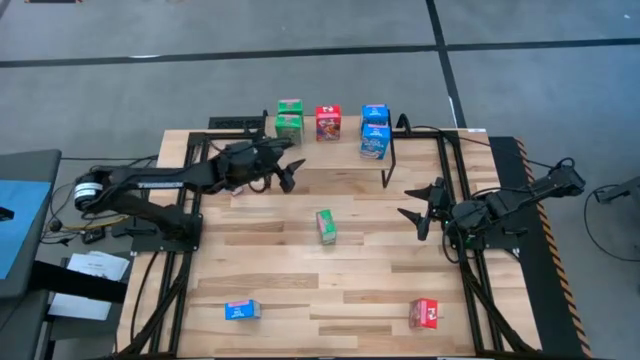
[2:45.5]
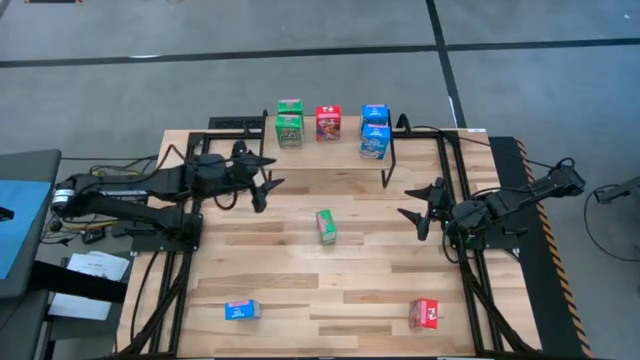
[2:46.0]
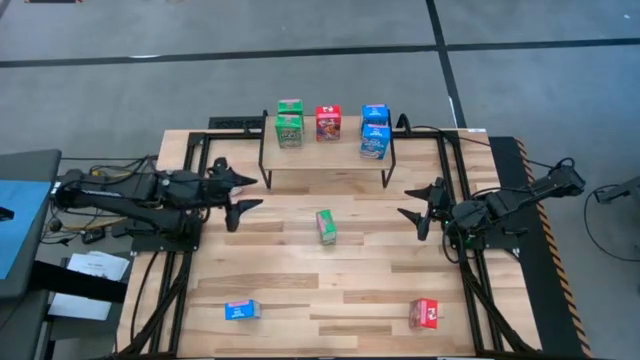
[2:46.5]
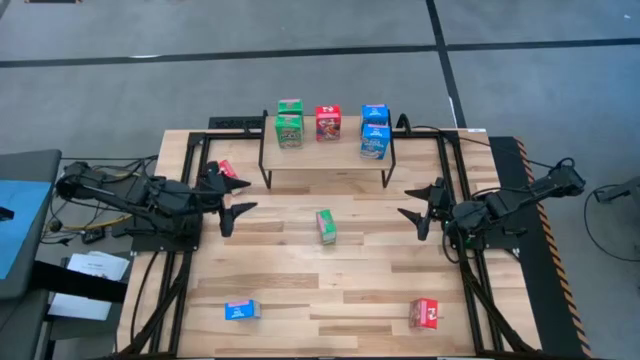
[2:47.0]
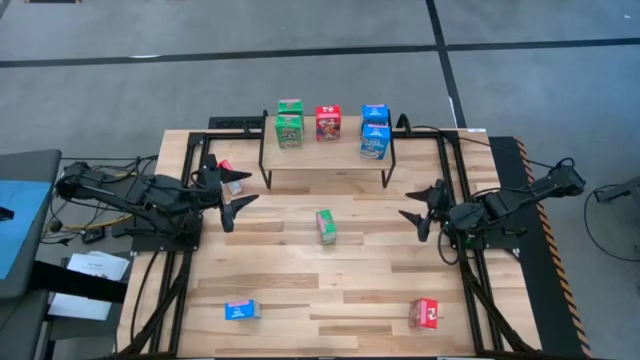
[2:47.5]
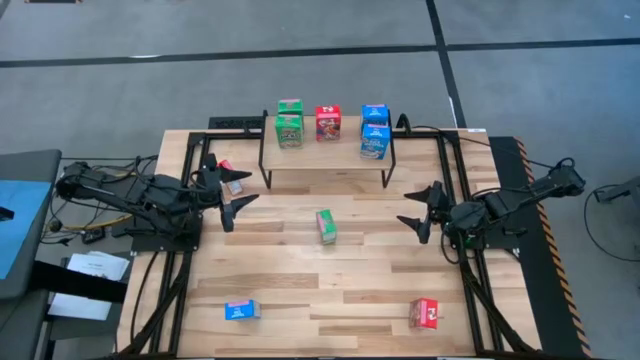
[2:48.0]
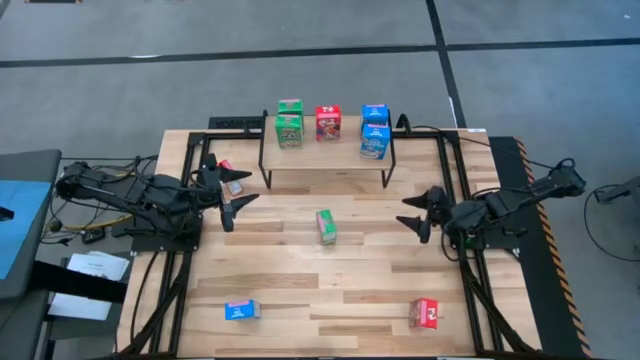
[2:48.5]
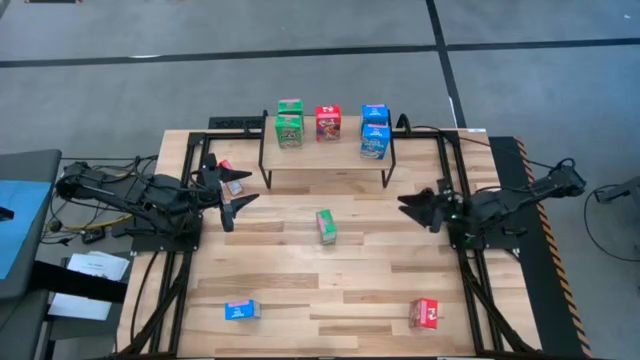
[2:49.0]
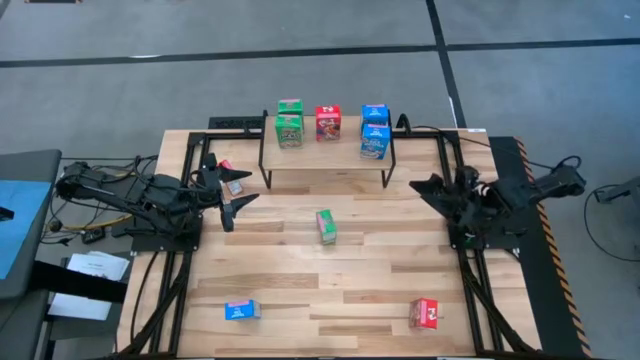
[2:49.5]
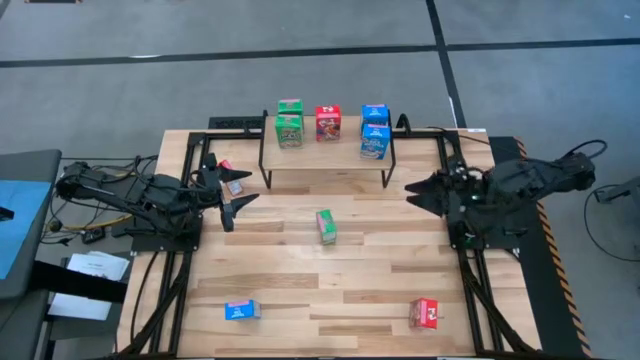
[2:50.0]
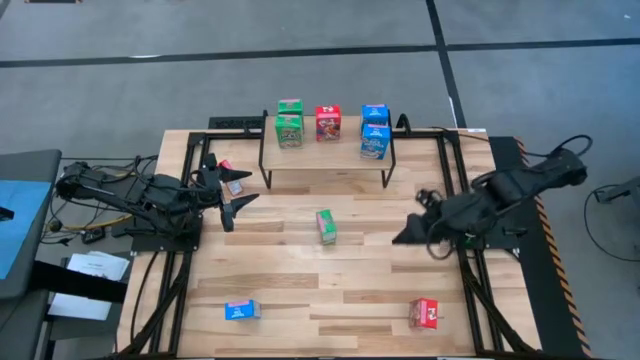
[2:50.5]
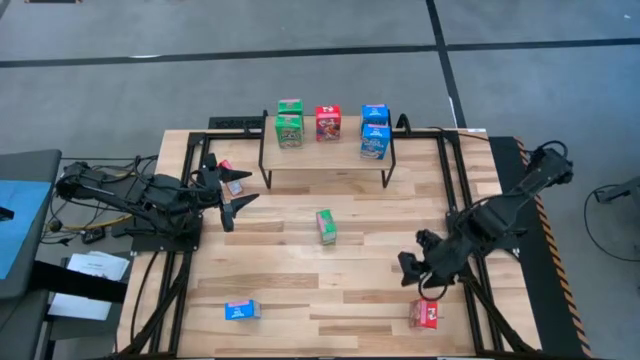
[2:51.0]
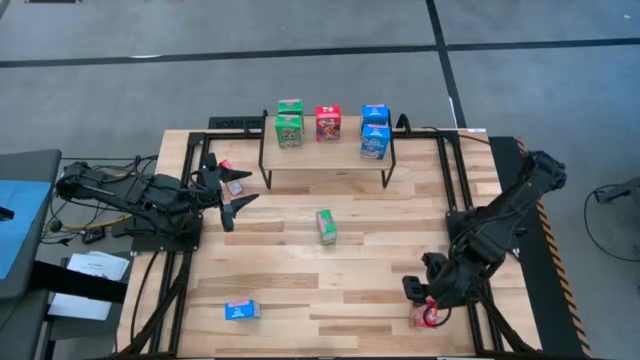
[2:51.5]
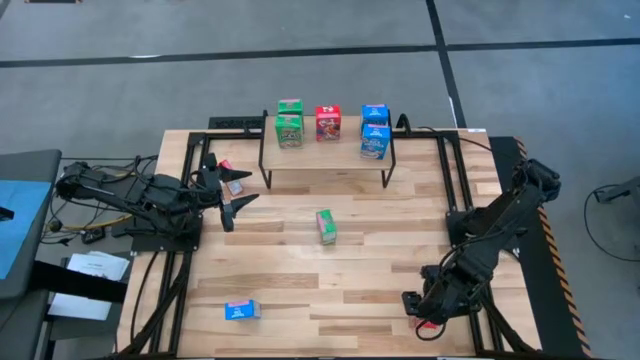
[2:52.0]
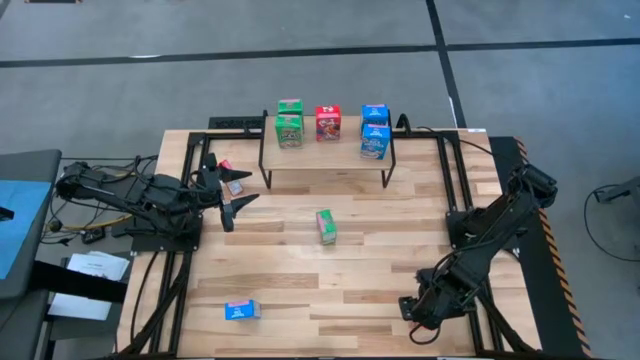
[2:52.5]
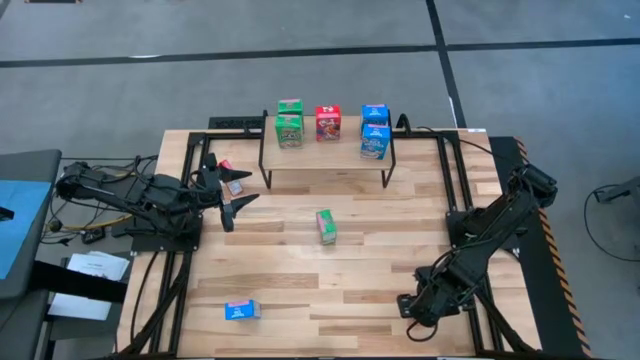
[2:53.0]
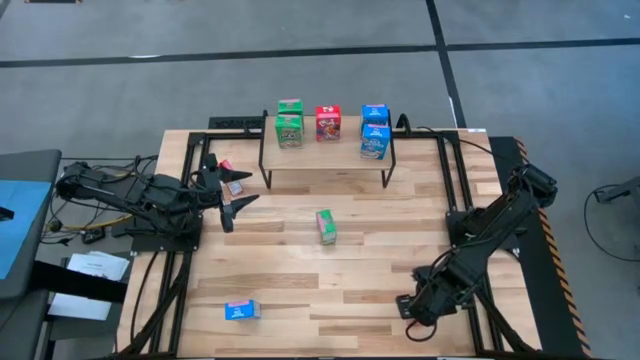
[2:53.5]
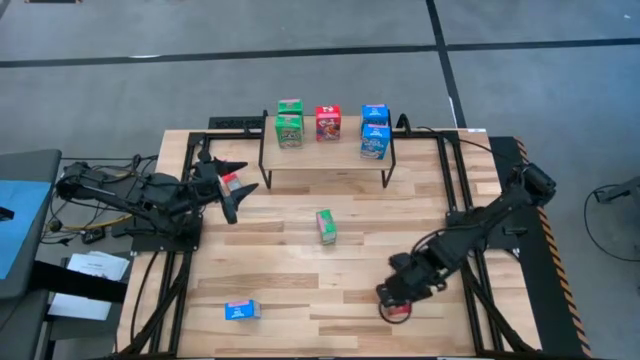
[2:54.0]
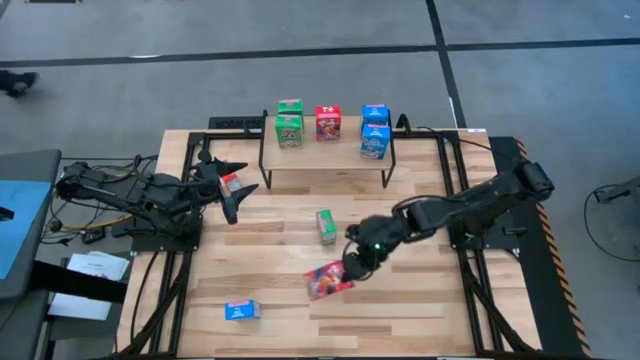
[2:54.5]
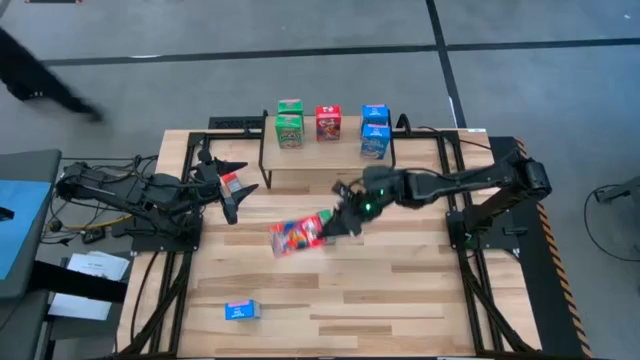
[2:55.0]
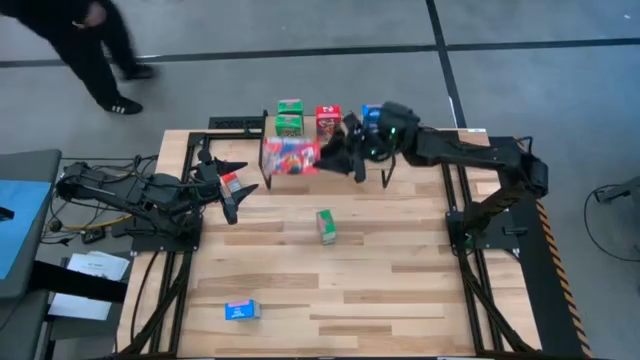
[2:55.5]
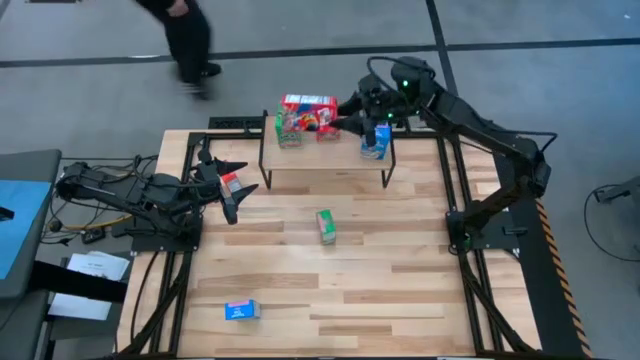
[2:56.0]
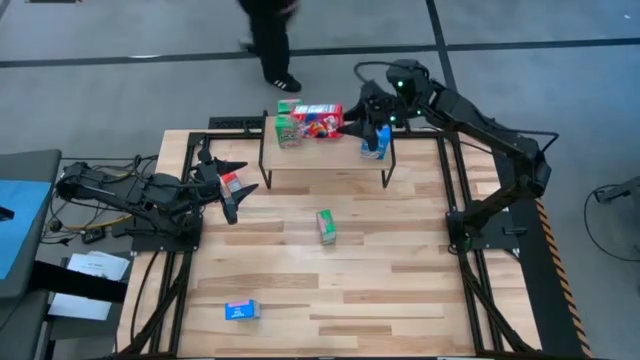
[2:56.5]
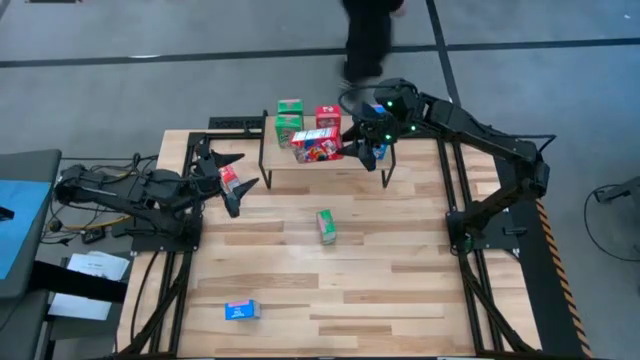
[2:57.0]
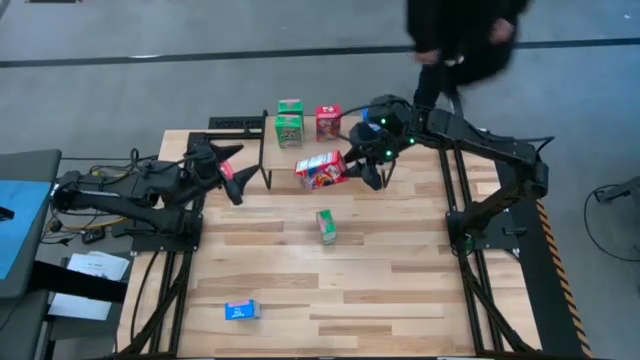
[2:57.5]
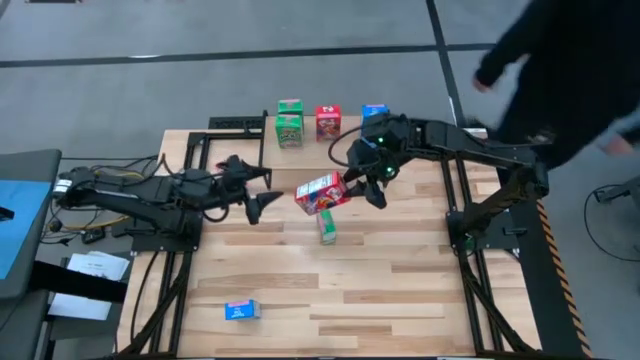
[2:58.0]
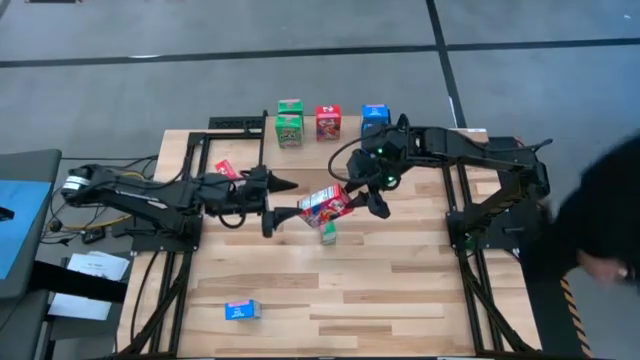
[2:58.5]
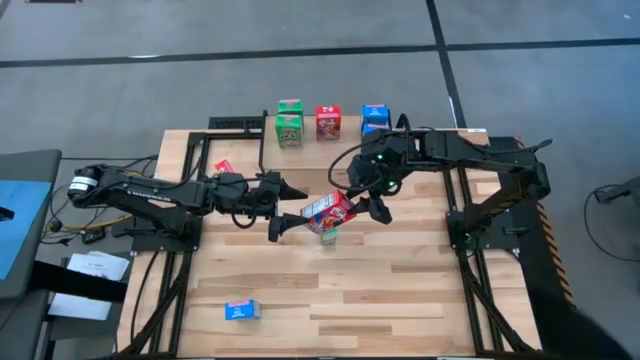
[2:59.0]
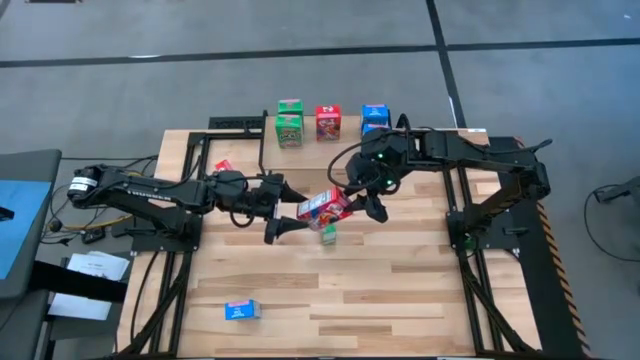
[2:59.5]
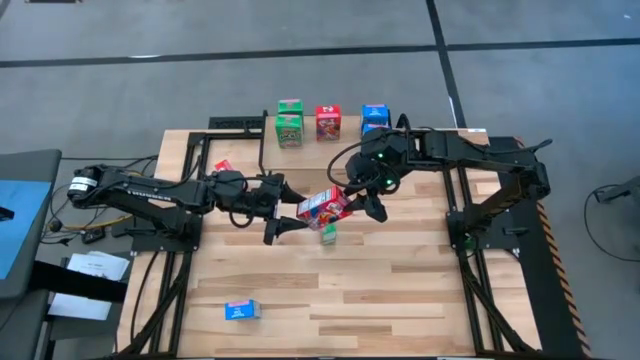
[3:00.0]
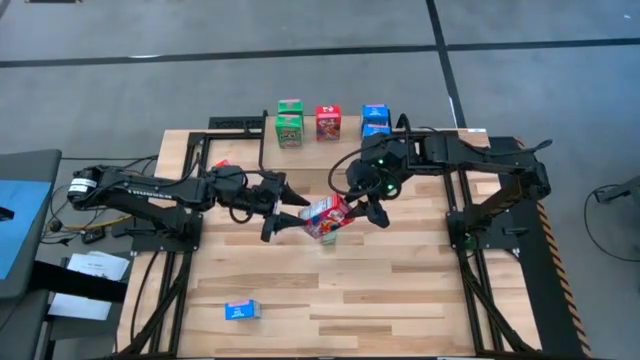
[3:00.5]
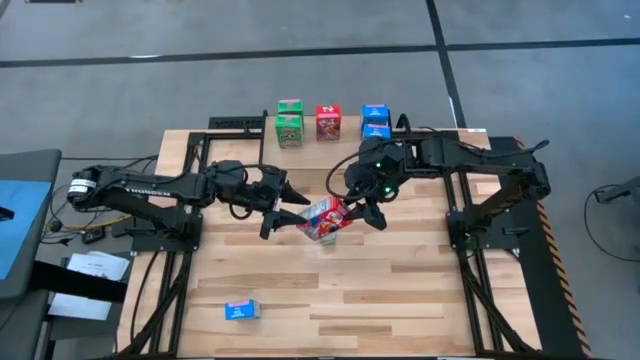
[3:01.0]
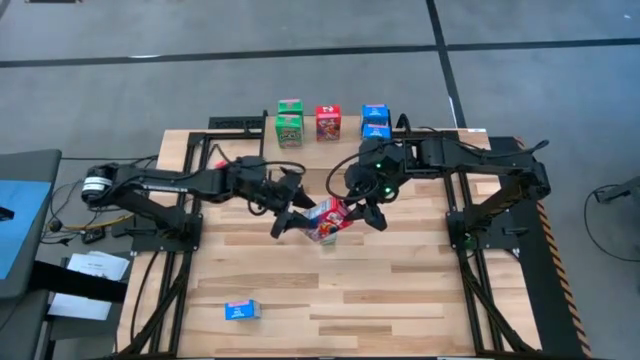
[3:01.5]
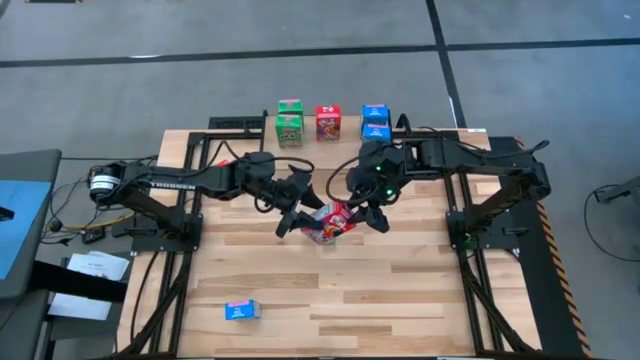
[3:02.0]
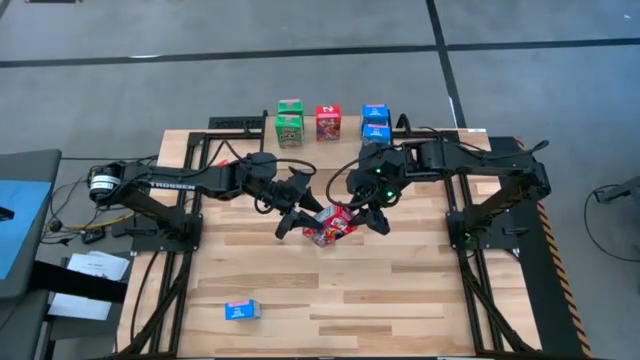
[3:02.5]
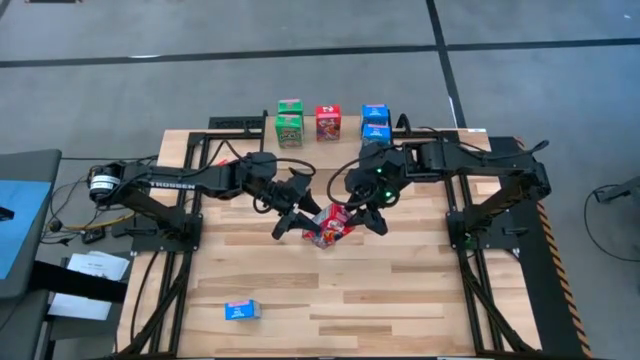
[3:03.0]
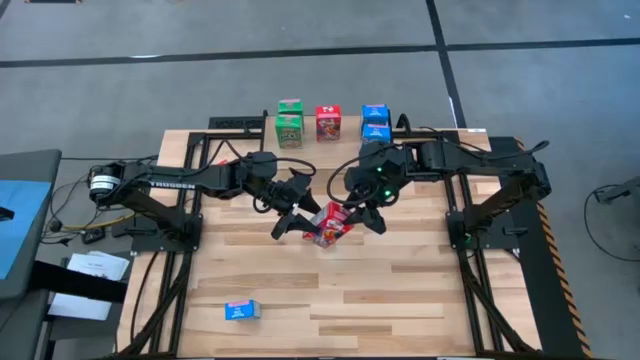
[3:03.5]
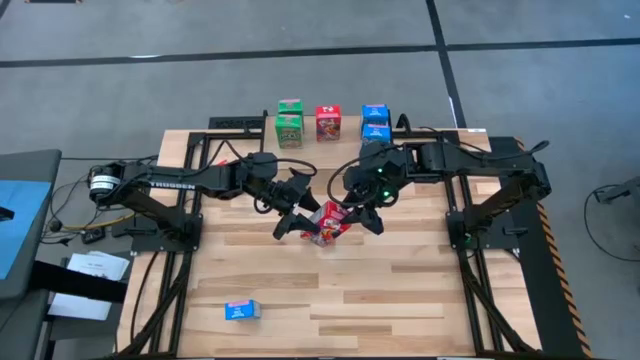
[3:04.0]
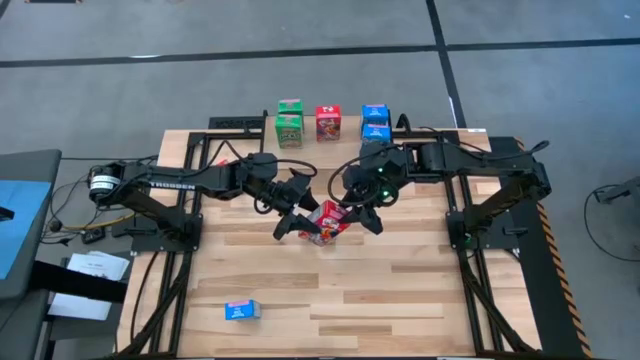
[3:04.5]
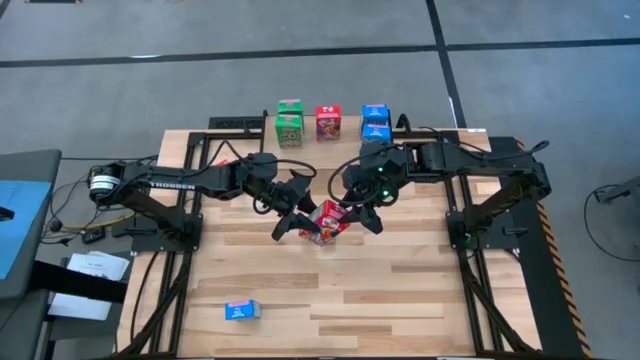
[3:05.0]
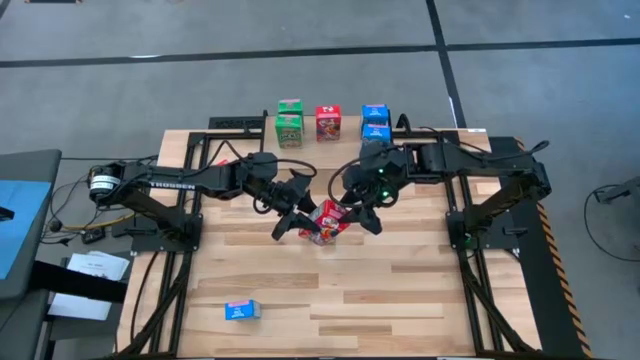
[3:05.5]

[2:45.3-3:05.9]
Task: Stack cereal on shelf
Put the bottom red cereal box on the shelf aligned with the other red cereal box

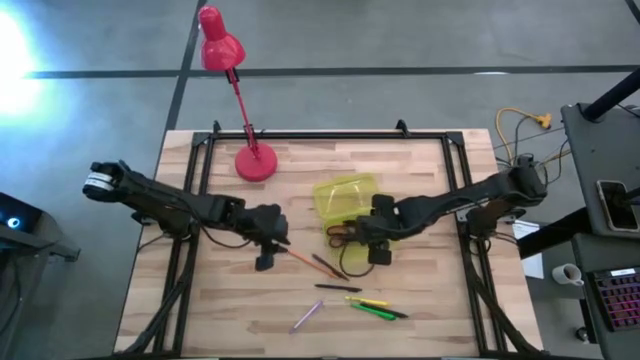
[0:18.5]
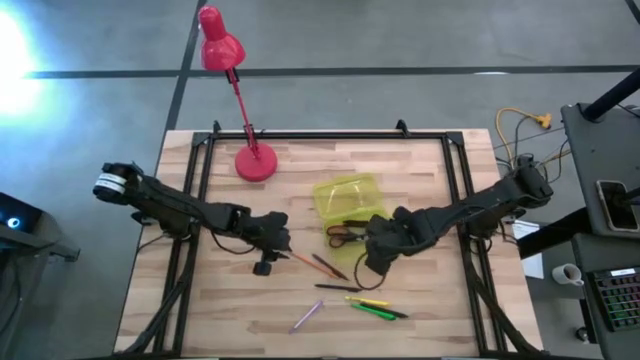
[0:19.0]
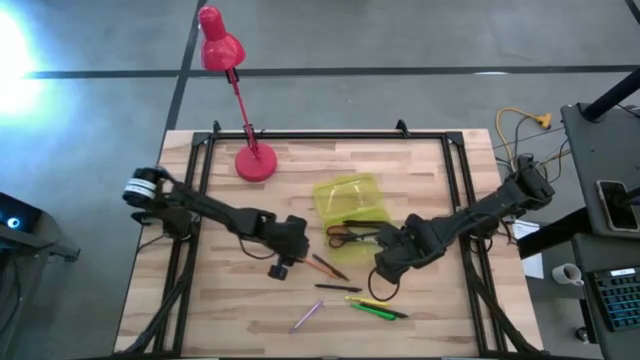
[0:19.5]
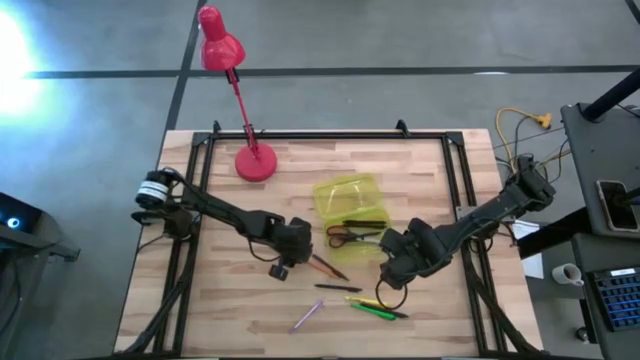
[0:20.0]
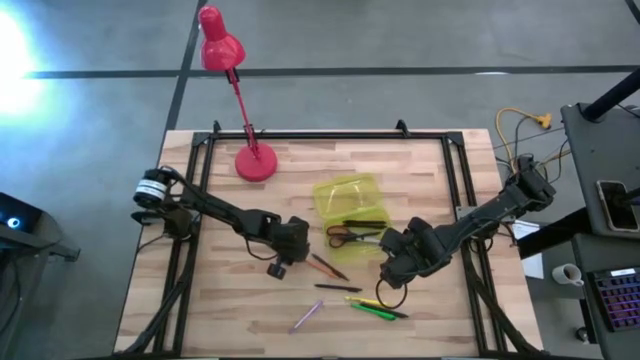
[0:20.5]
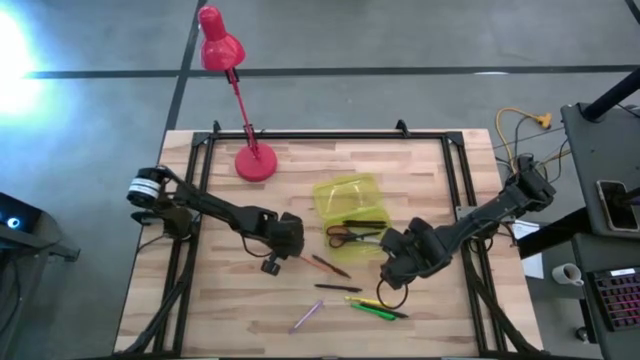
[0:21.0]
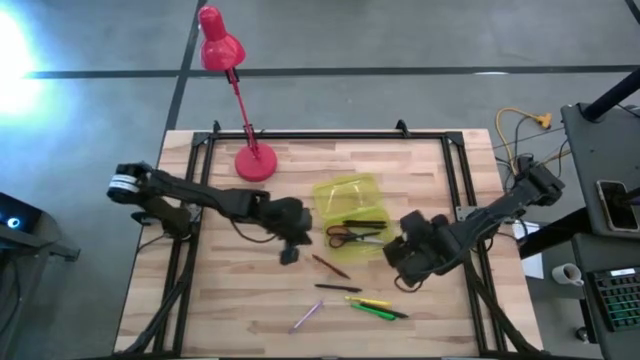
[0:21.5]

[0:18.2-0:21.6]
Task: Pick & place school supplies into a supply box
Put the orange pencil into the yellow supply box
